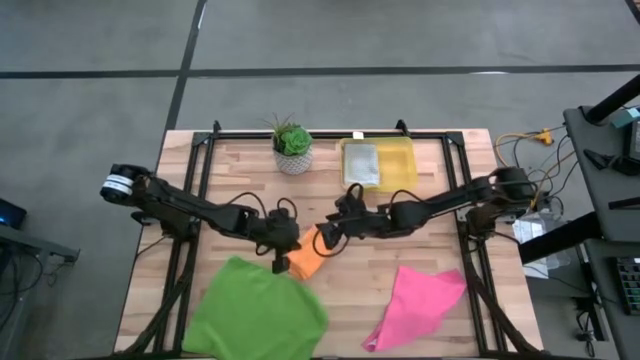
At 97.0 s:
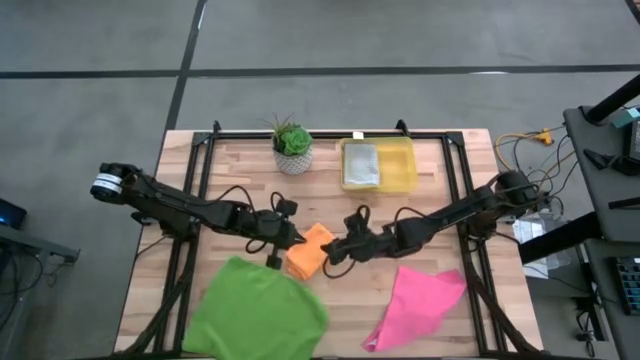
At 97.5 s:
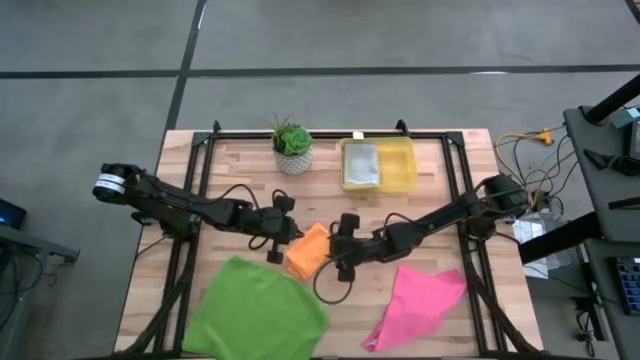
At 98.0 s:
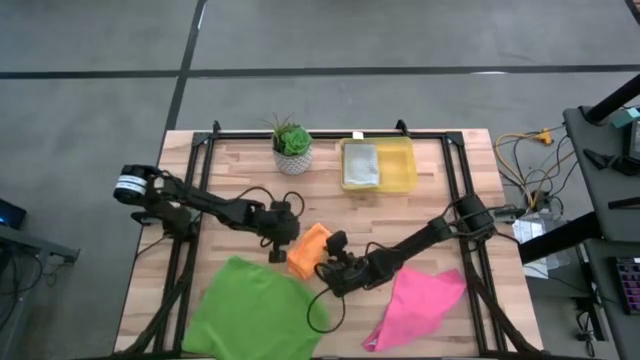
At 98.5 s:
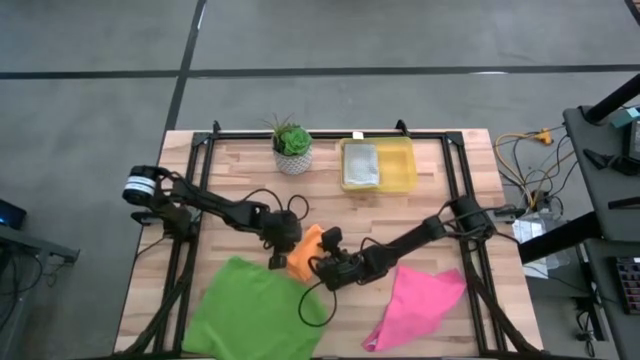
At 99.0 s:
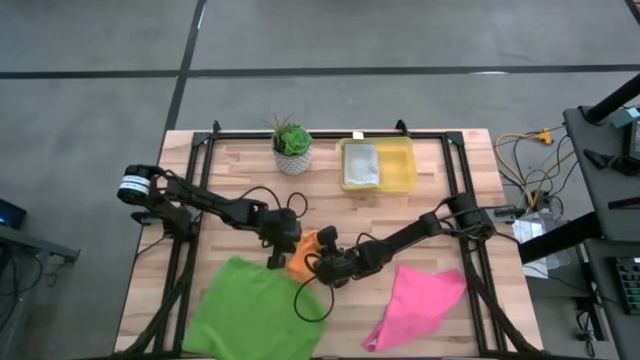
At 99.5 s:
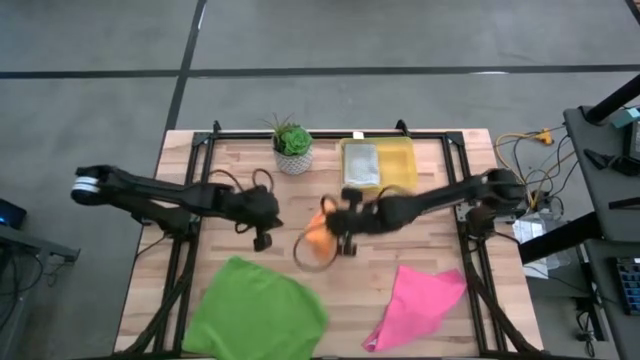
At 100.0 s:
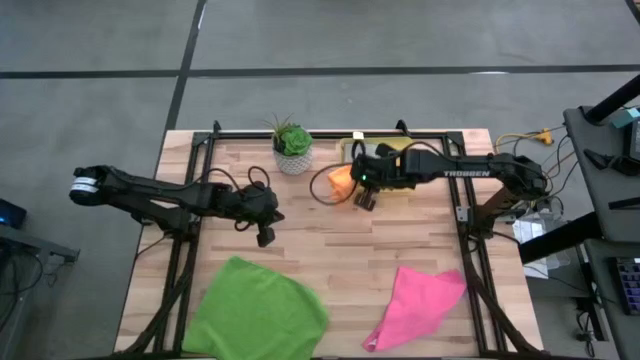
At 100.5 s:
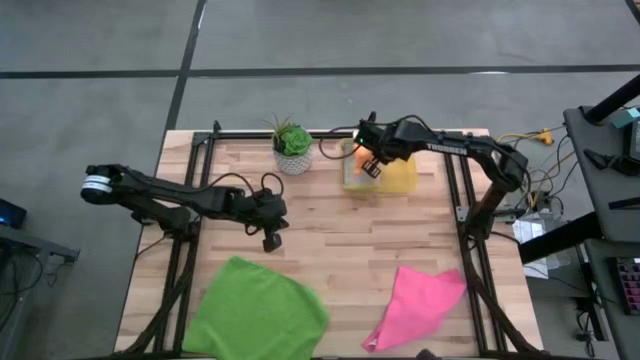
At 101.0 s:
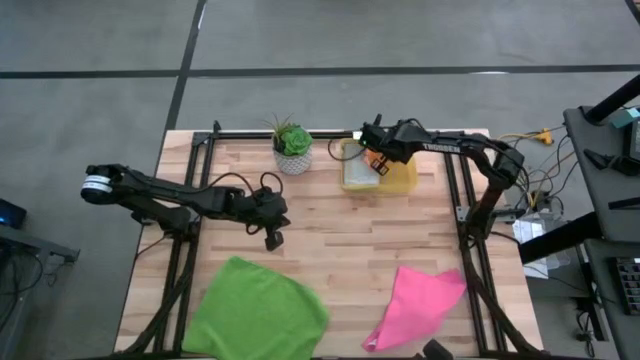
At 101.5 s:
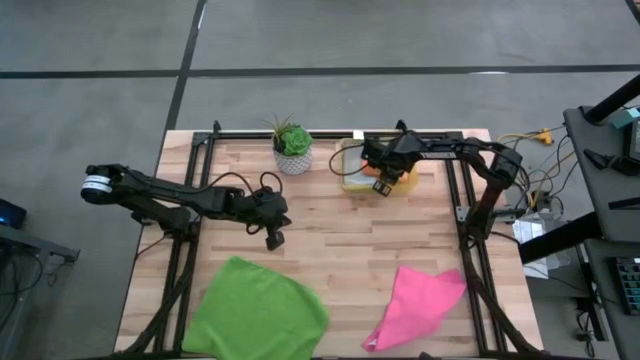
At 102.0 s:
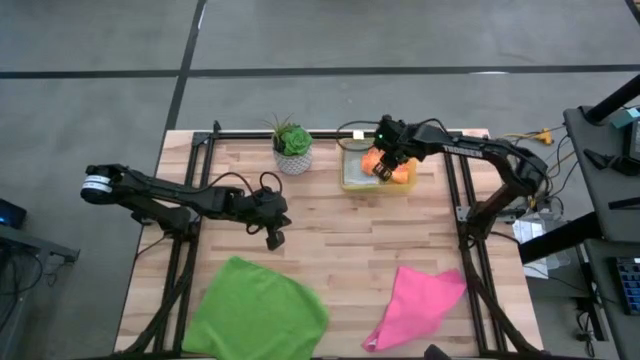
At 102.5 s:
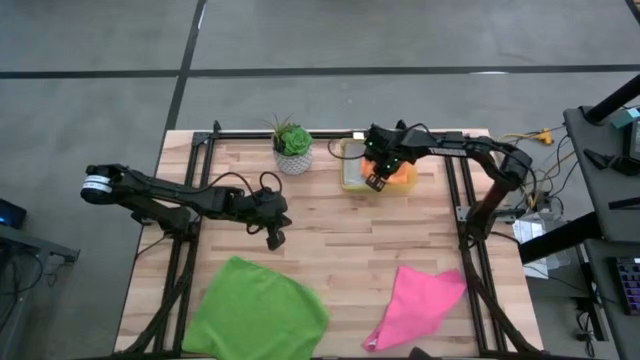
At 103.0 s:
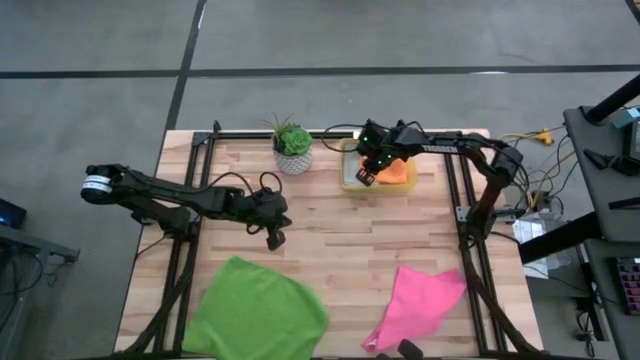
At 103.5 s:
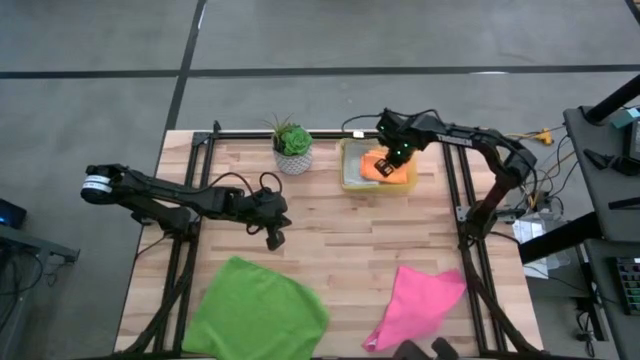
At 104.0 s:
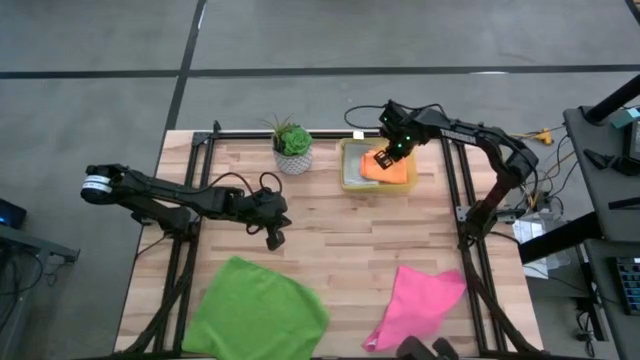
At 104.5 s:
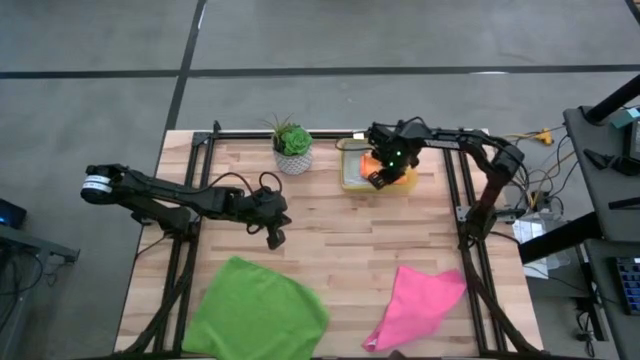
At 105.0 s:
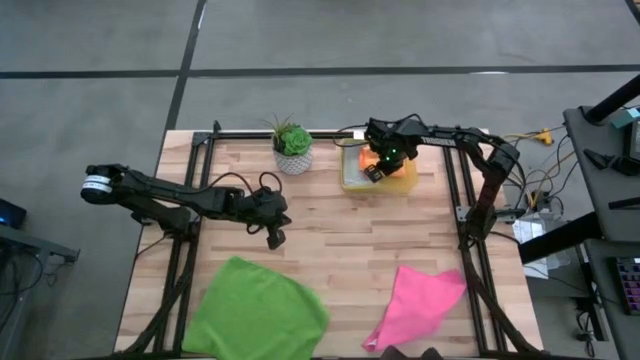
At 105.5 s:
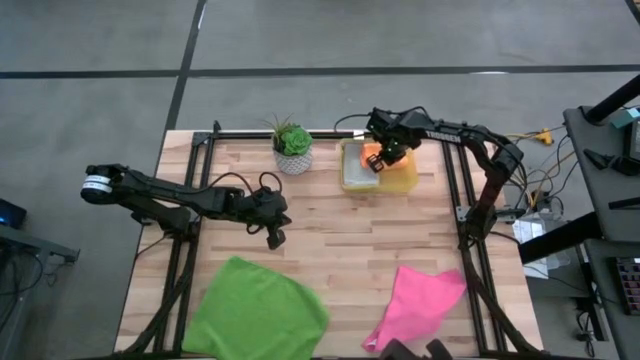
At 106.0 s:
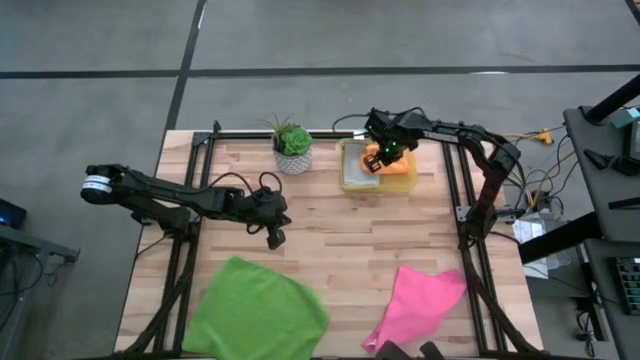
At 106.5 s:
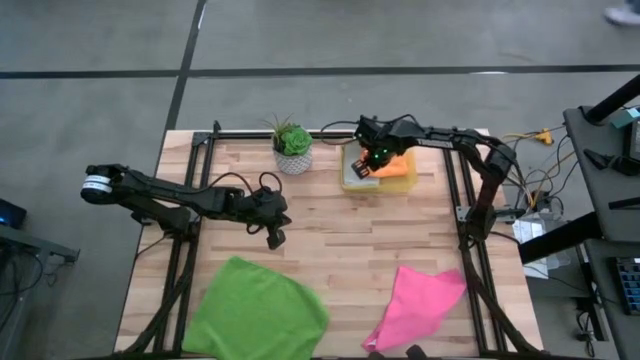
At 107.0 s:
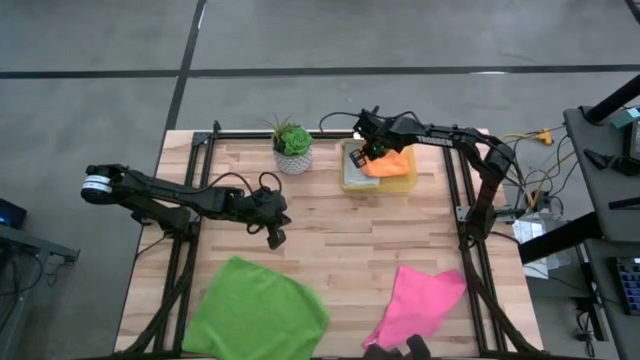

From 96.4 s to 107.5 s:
Task: Fold microfiber towels
Put the orange microfiber cloth into the yellow bin

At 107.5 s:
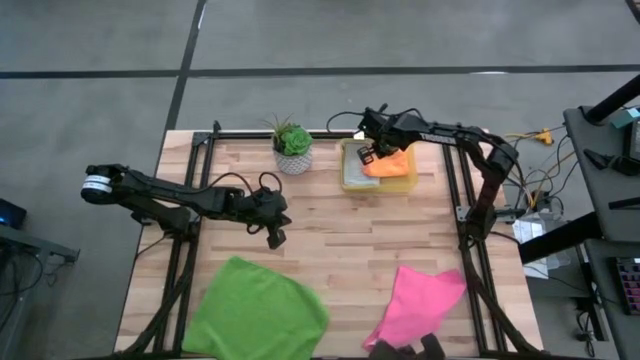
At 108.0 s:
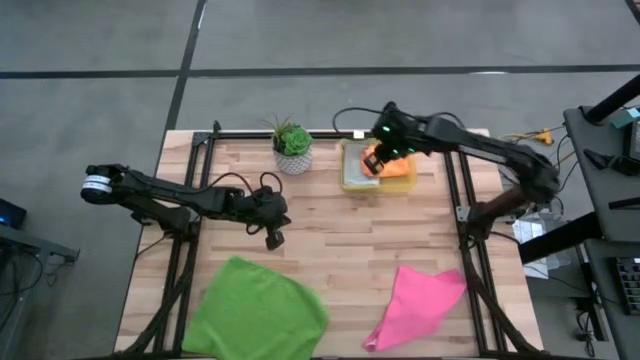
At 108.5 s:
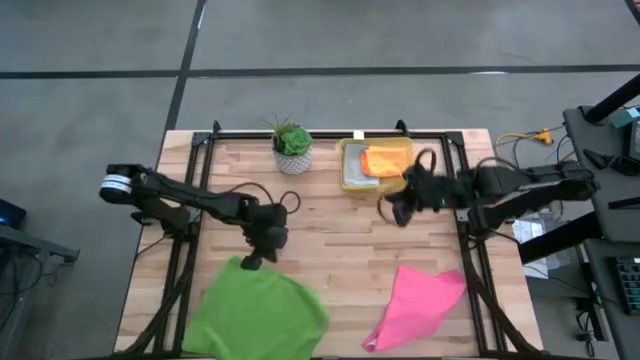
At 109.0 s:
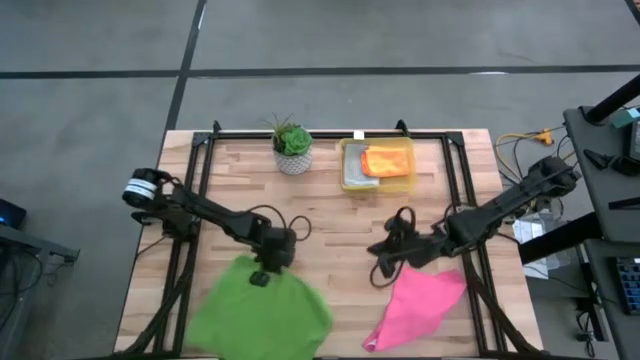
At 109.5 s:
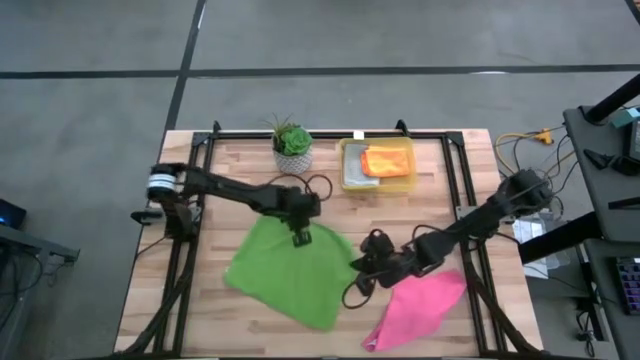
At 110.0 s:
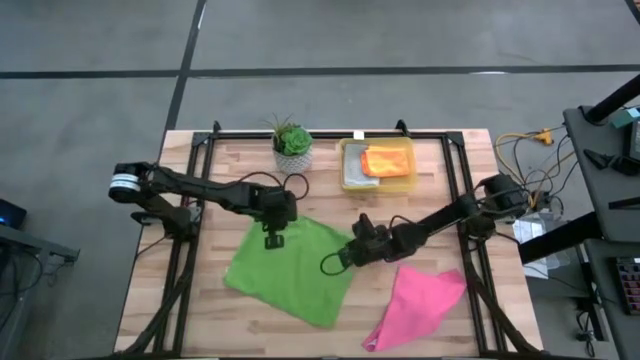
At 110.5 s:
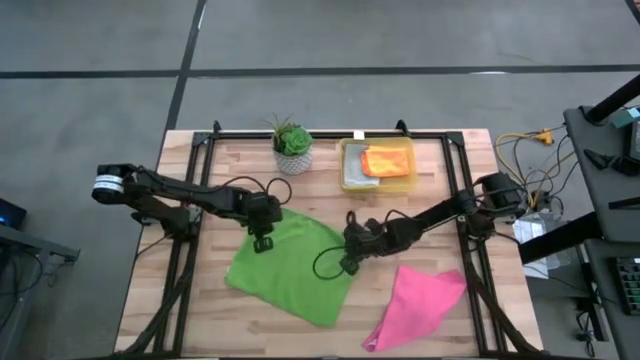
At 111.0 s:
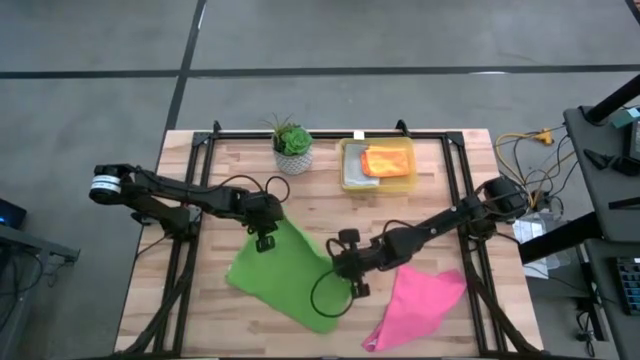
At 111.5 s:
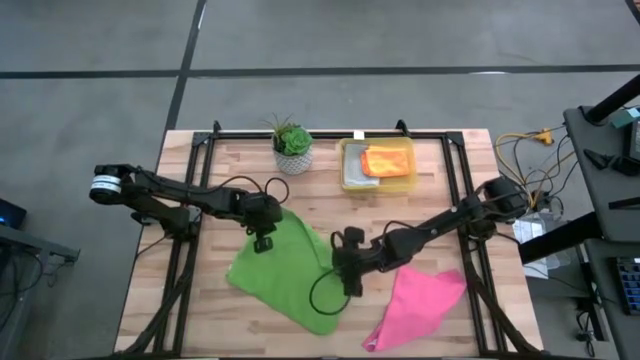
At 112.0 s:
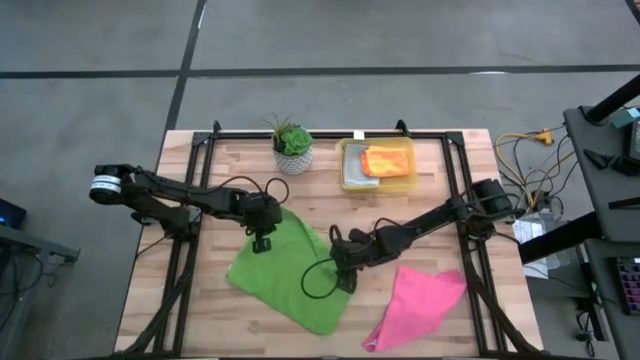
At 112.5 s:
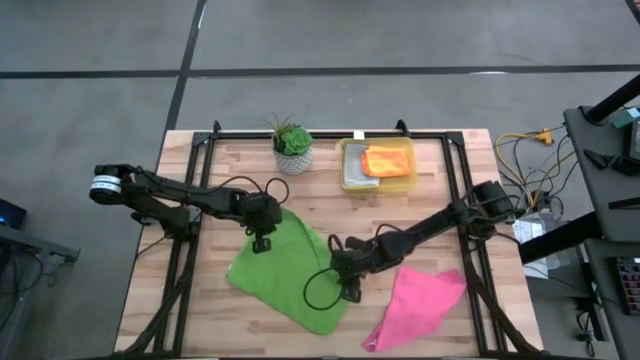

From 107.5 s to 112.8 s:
Fold the green microfiber cloth

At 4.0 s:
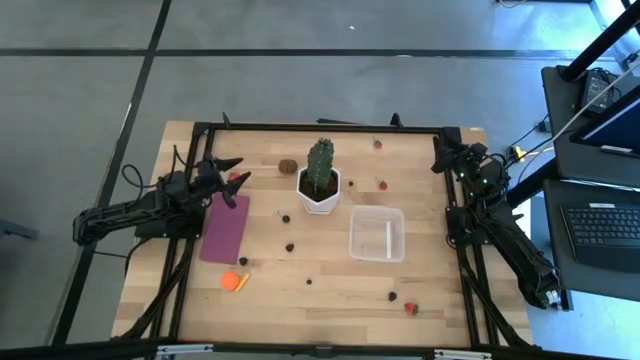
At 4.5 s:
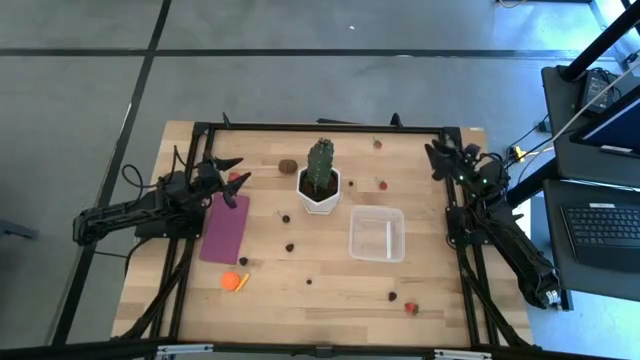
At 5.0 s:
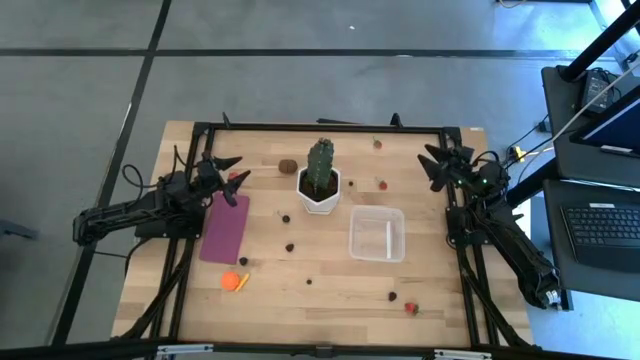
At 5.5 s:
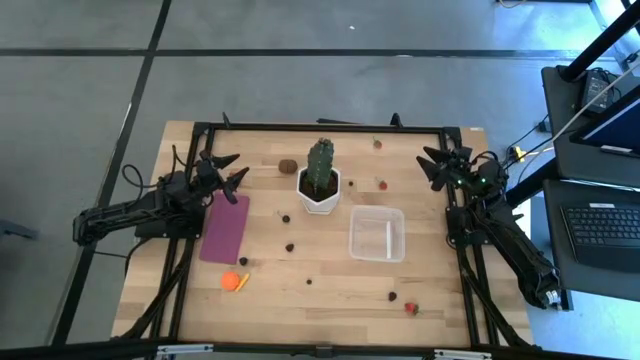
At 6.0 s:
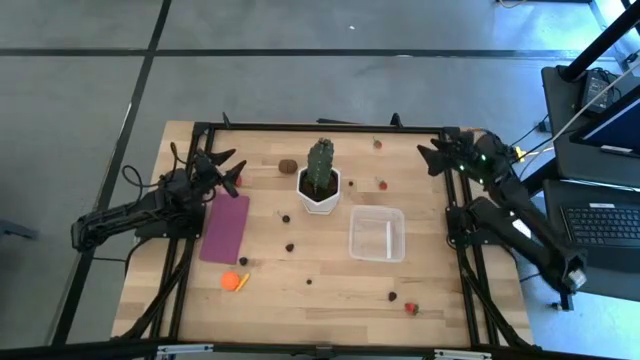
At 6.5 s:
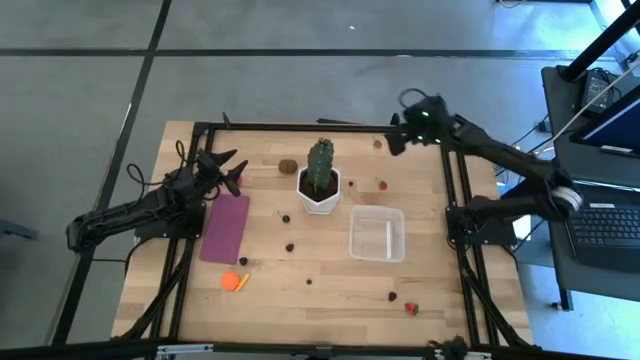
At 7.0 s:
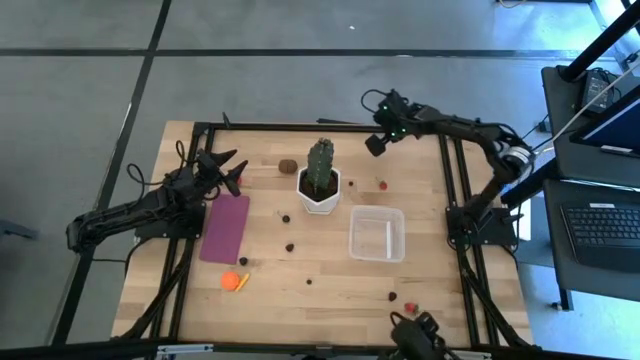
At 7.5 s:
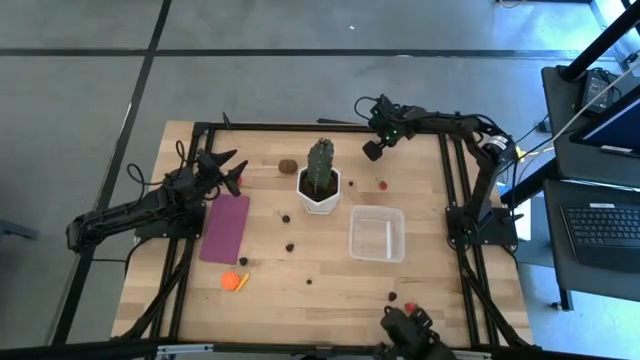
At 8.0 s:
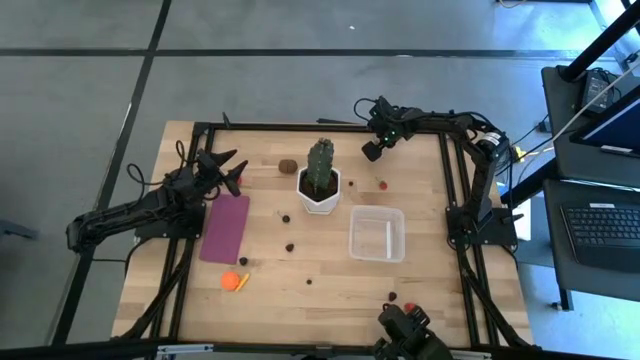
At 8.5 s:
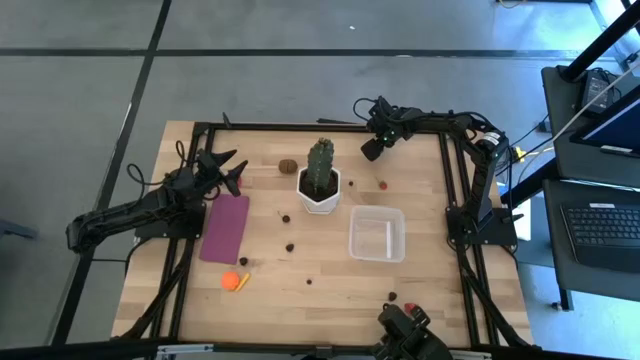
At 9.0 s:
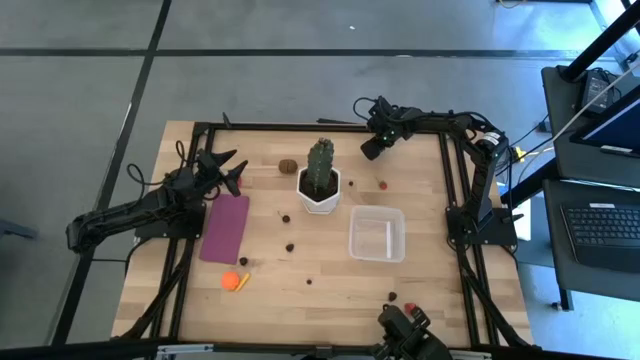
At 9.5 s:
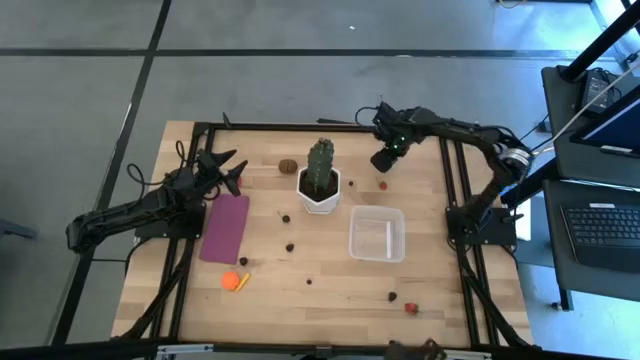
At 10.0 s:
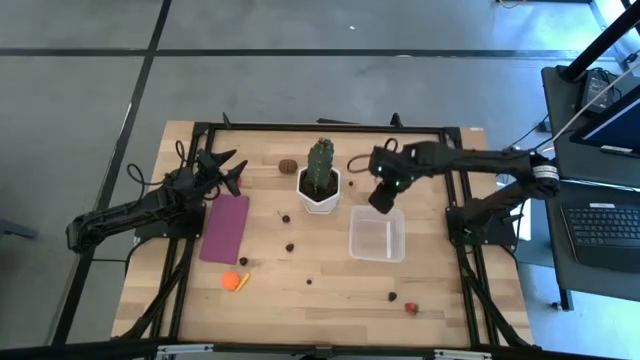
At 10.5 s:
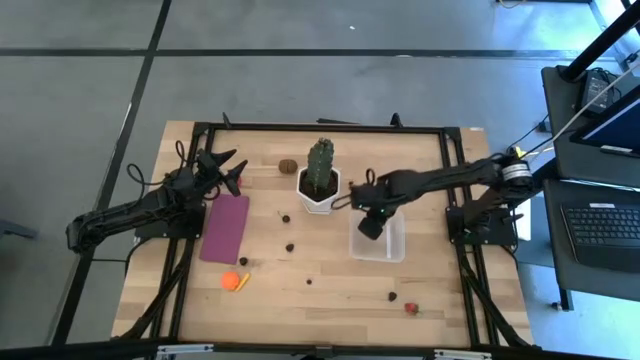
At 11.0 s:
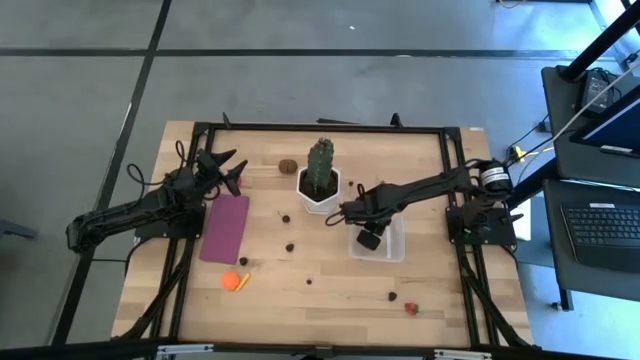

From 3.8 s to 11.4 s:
Task: Pick and placing Produce into tupperware
Put the strawberry into the transparent bin
